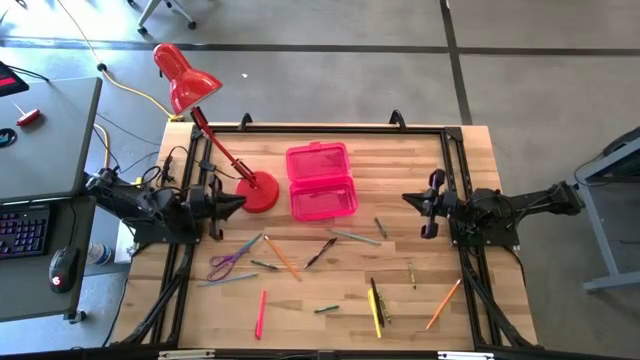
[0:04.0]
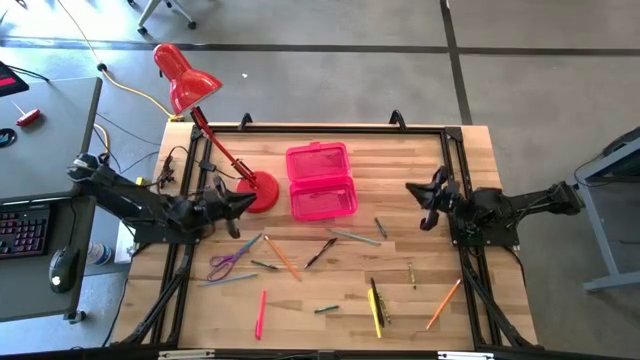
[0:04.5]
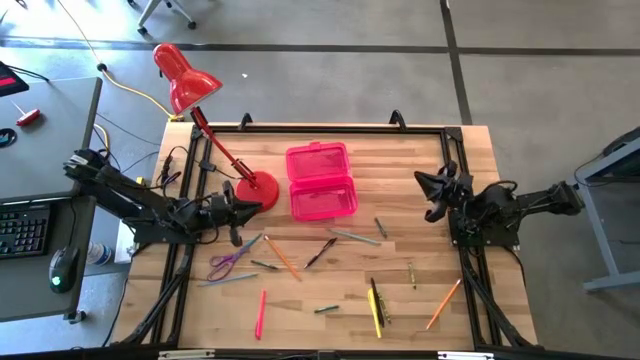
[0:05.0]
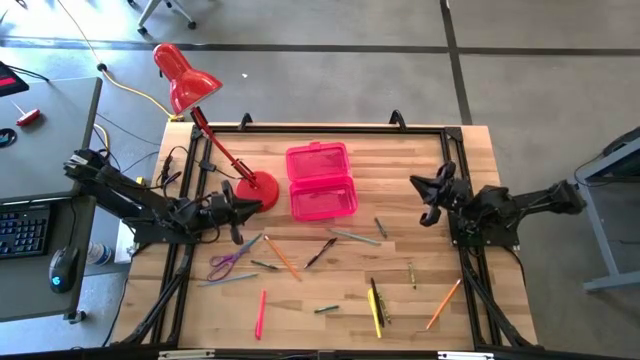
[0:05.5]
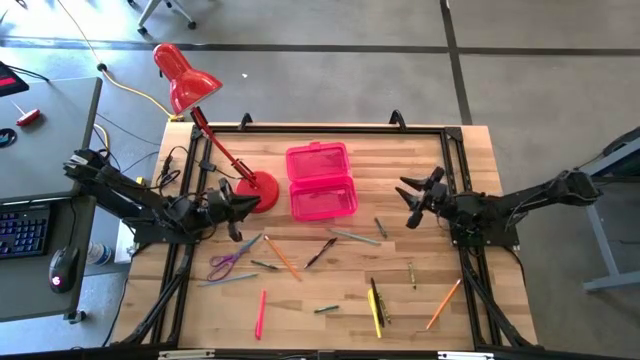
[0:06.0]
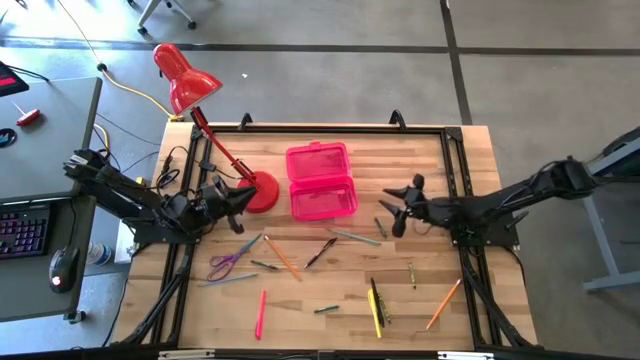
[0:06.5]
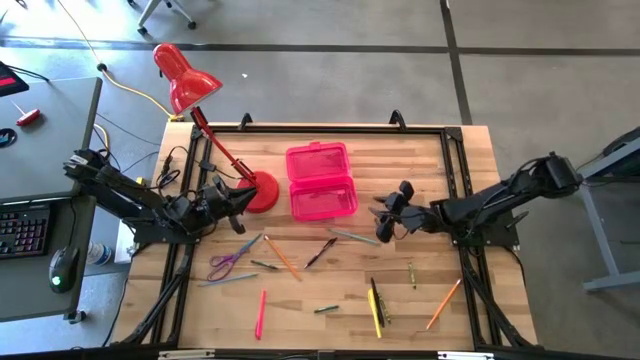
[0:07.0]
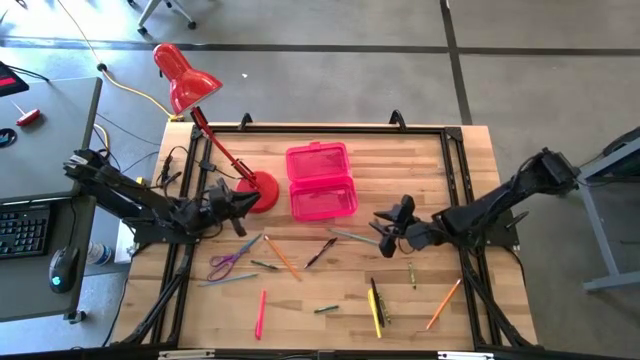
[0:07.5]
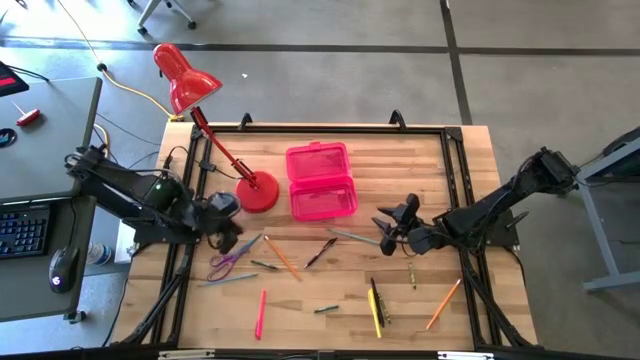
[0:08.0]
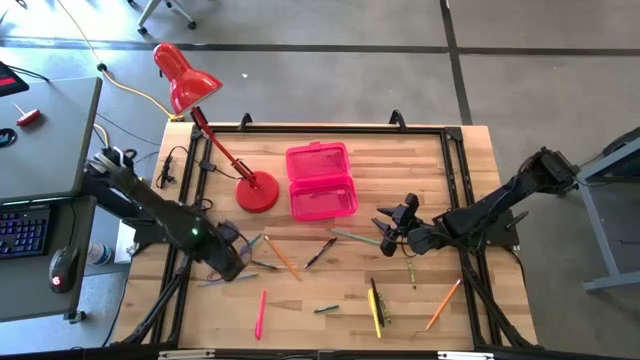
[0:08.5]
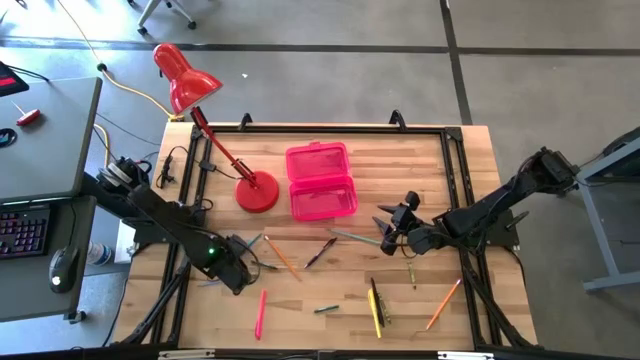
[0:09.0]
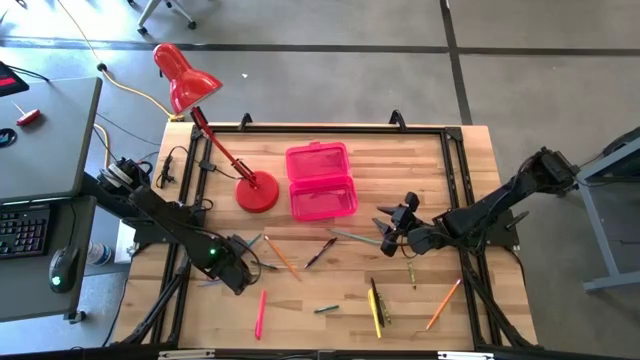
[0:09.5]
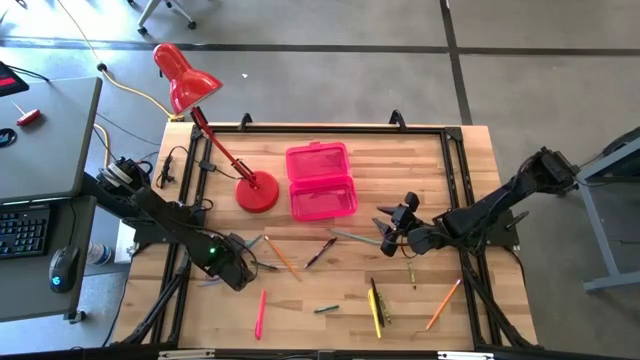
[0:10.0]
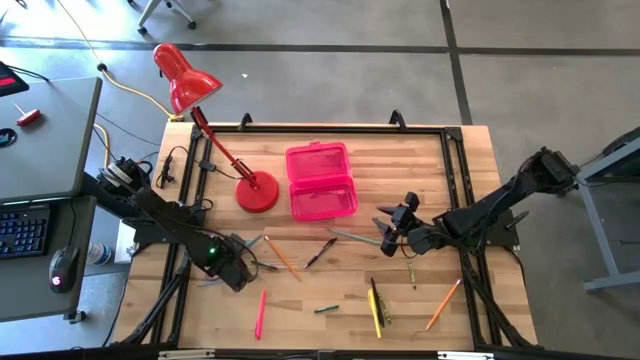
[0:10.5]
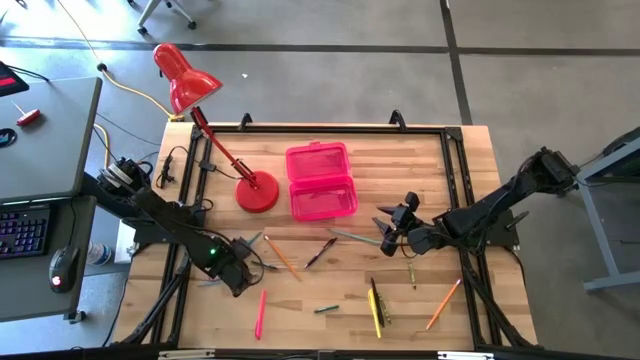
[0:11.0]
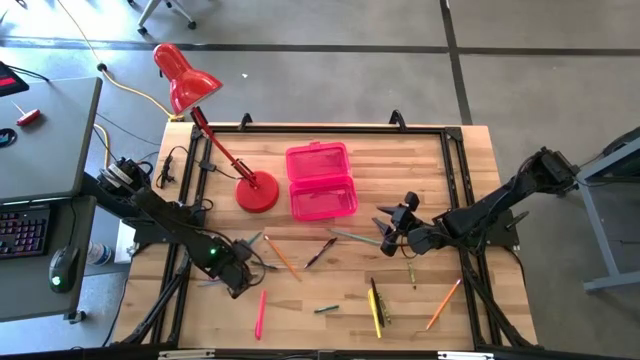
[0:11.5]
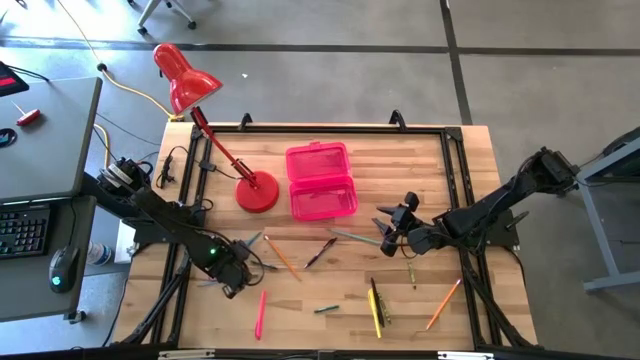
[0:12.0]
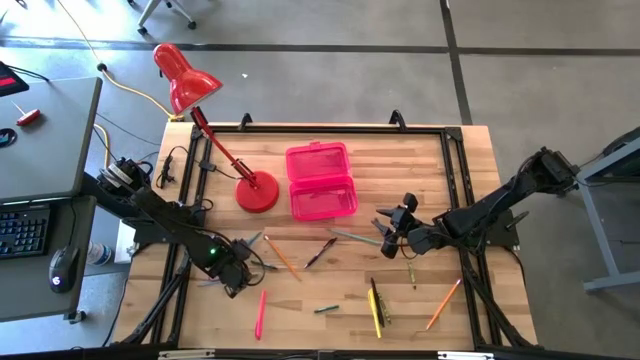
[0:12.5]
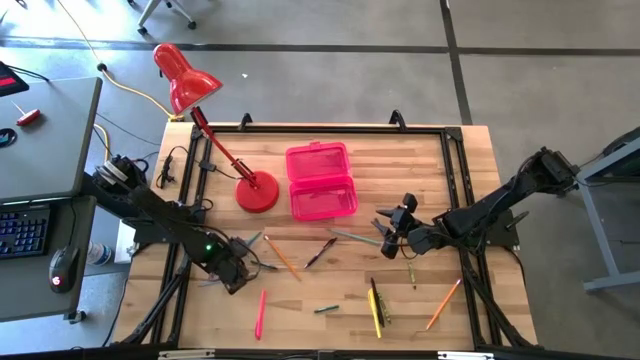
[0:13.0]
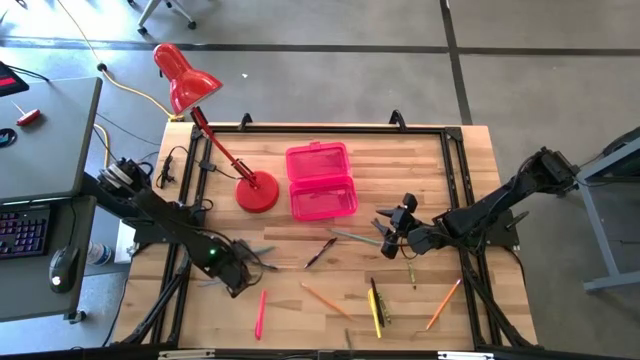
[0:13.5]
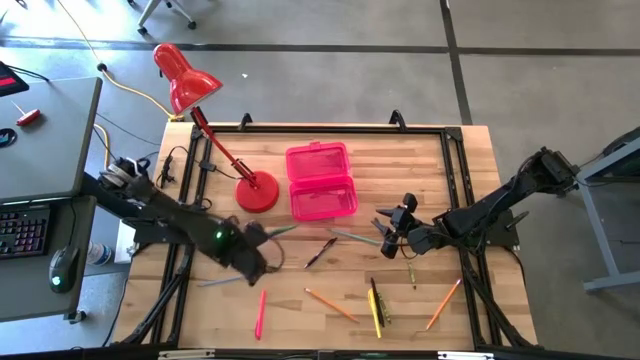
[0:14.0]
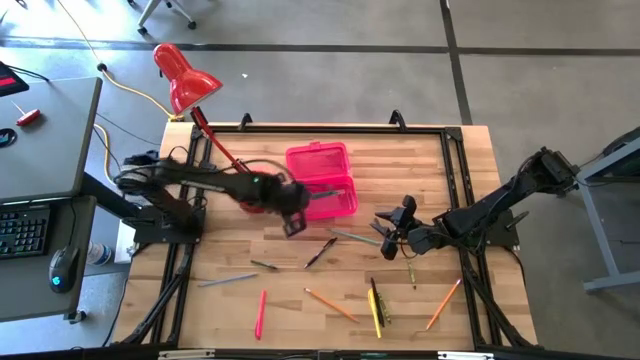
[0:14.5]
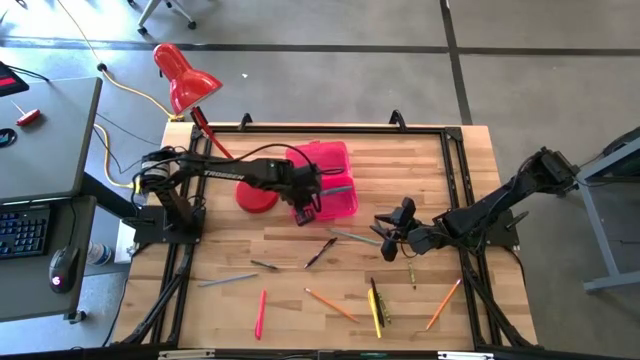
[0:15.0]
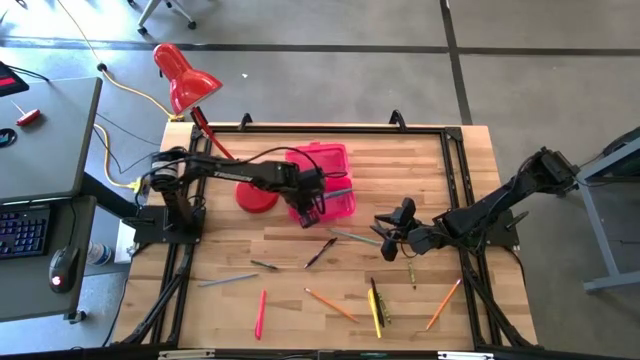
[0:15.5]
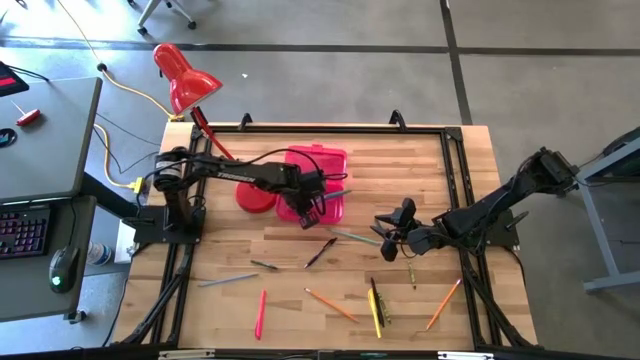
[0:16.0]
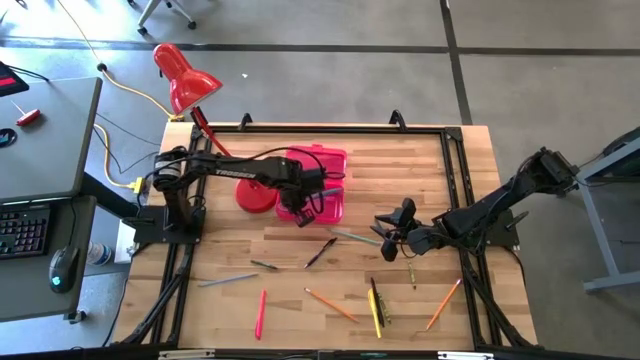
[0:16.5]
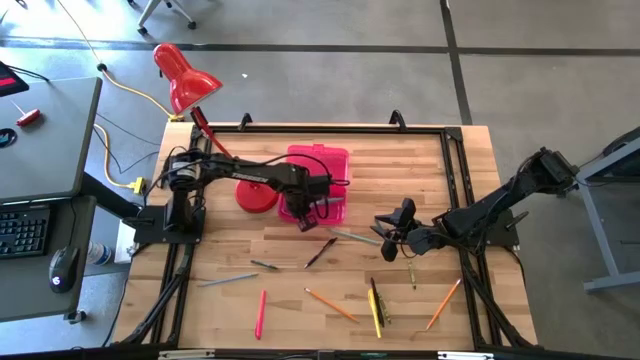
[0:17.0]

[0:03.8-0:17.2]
Task: Pick & place school supplies into a supply box
Put the purple scissors into the pink supply box

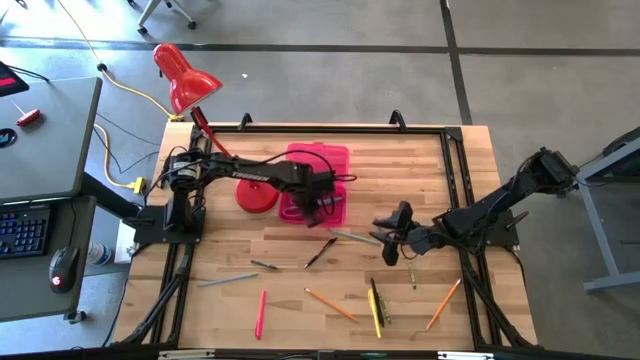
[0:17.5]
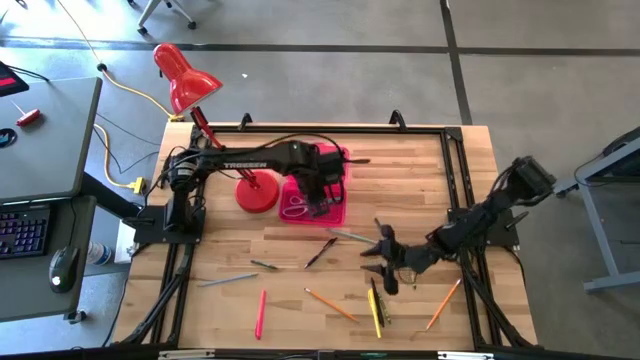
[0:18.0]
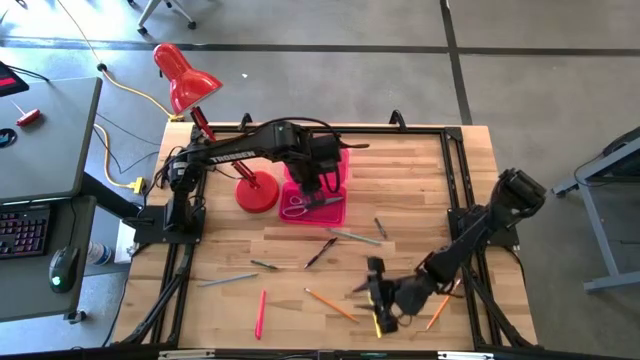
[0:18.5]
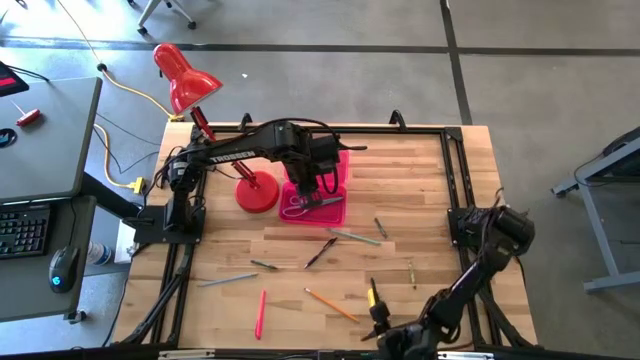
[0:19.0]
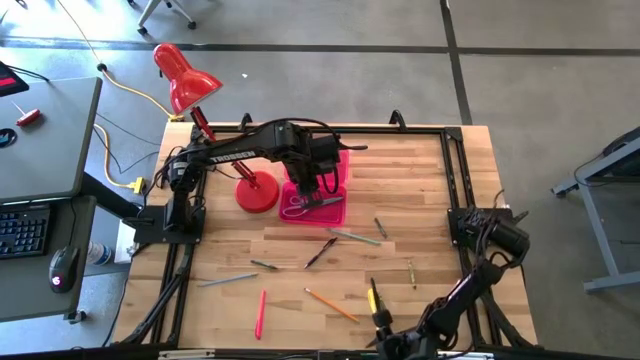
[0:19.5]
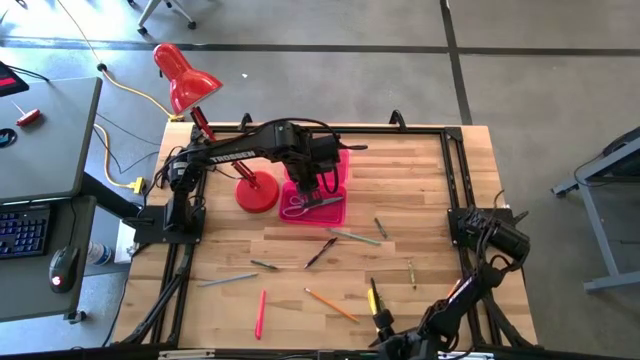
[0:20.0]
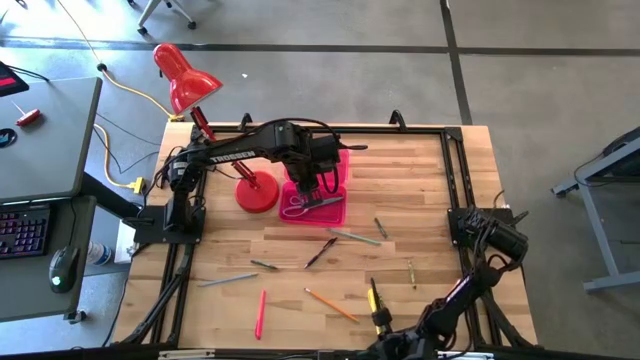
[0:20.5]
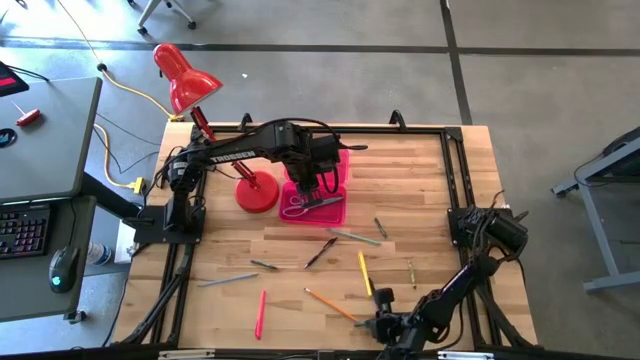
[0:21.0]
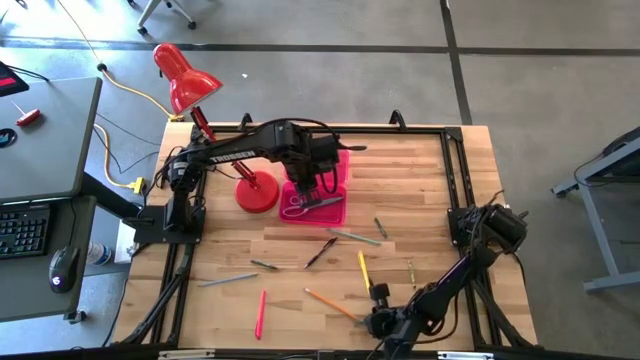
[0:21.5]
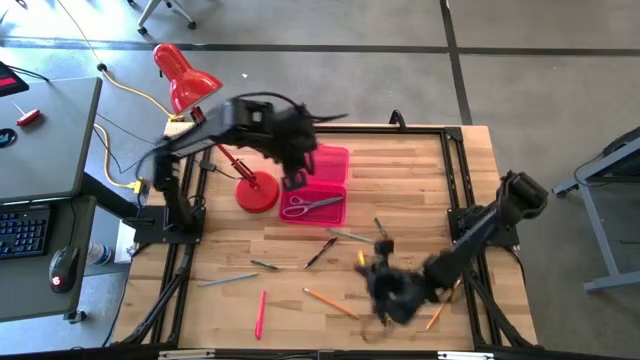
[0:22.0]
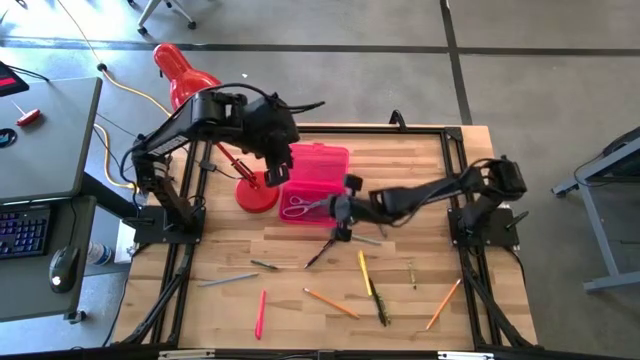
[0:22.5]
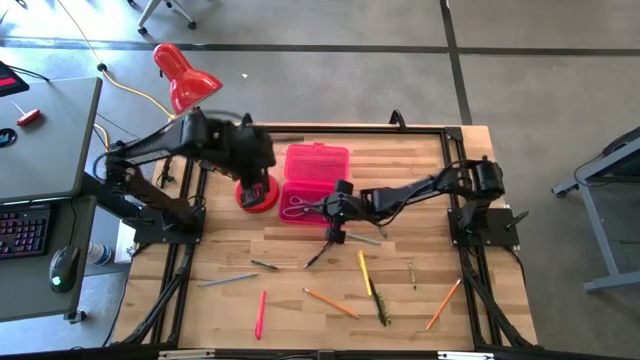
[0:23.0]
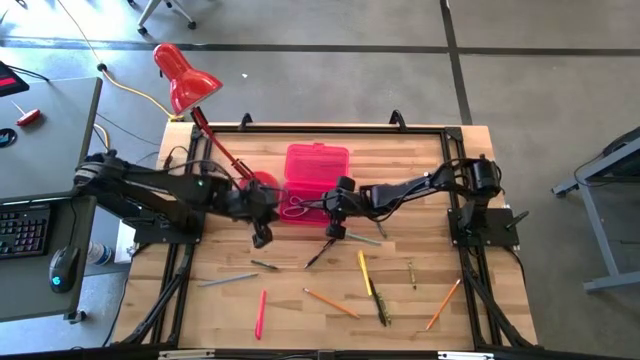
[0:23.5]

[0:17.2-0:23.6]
Put the bottom green crayon into the pink supply box

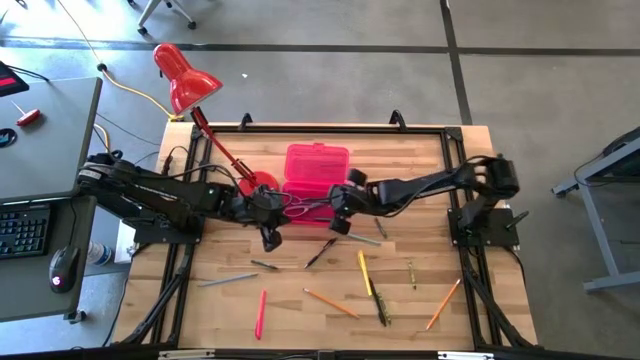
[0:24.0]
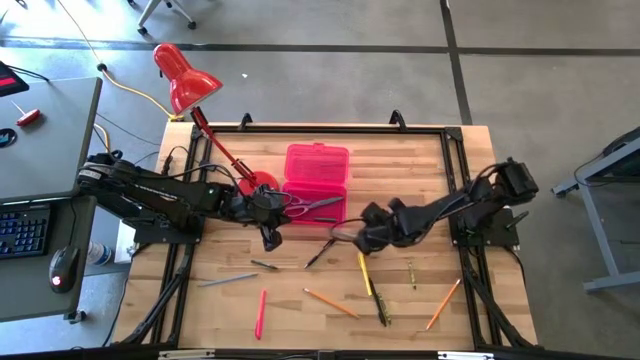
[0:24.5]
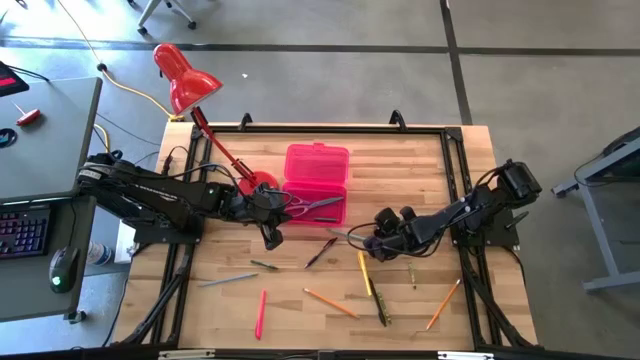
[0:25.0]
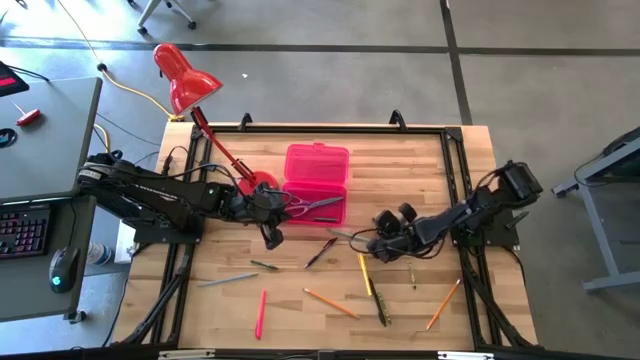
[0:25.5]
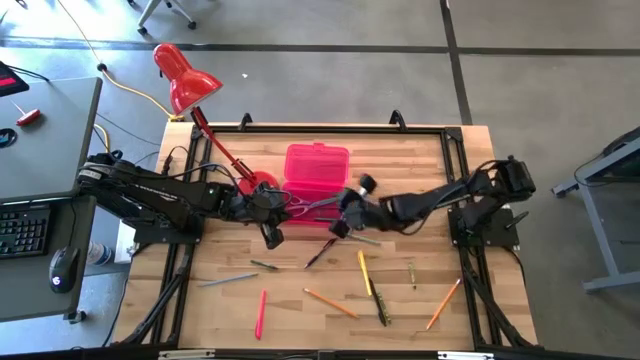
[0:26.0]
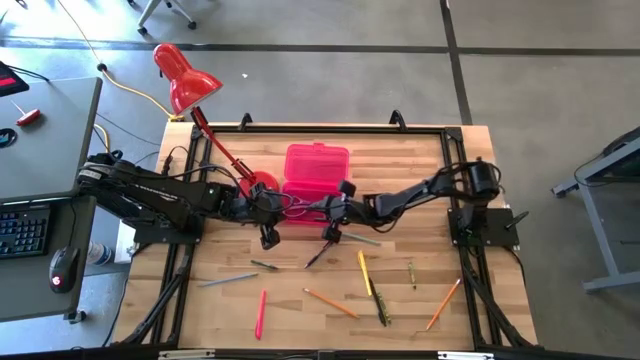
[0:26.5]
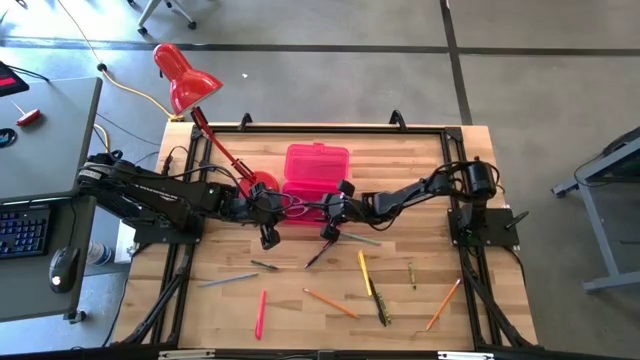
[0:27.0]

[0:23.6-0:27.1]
Put the top green crayon into the pink supply box
